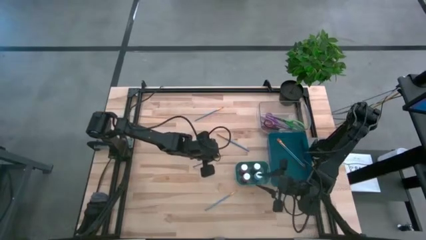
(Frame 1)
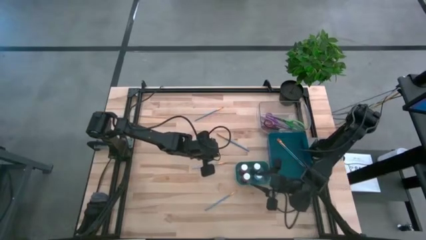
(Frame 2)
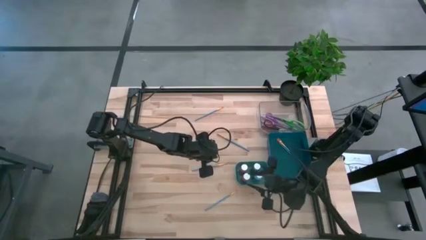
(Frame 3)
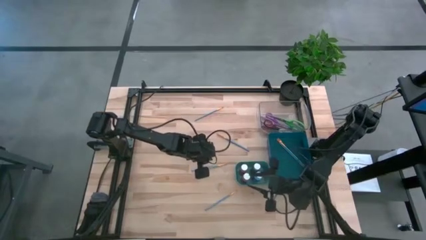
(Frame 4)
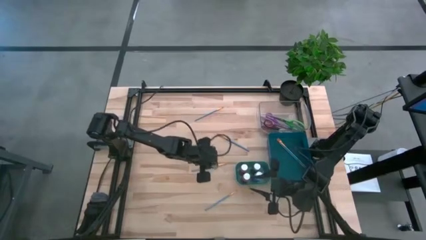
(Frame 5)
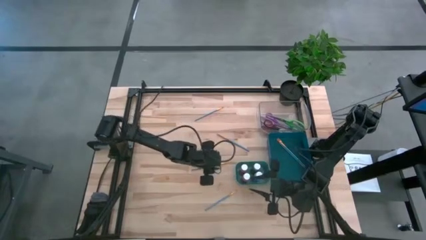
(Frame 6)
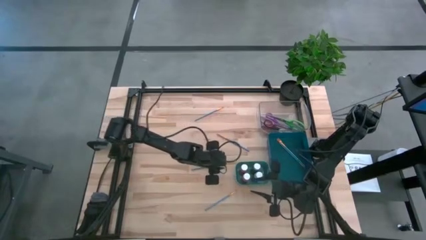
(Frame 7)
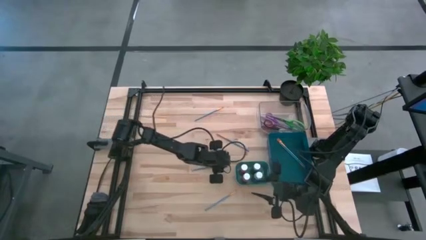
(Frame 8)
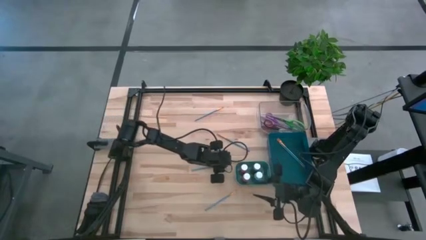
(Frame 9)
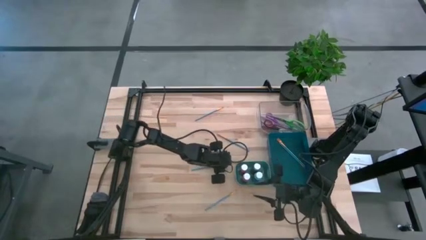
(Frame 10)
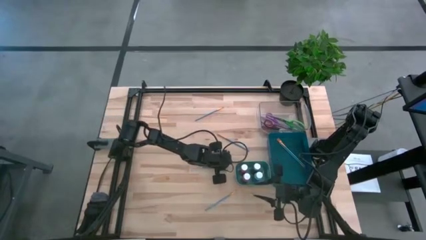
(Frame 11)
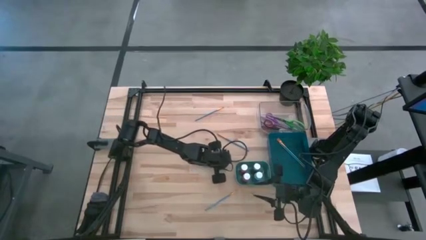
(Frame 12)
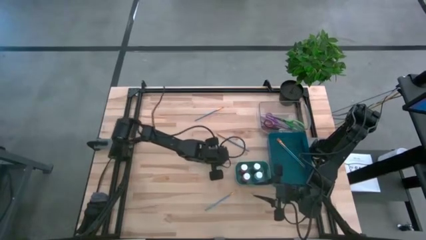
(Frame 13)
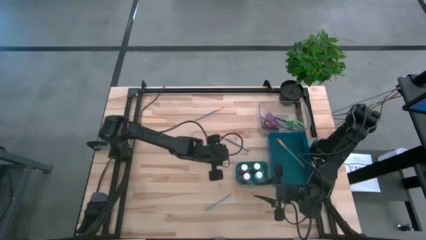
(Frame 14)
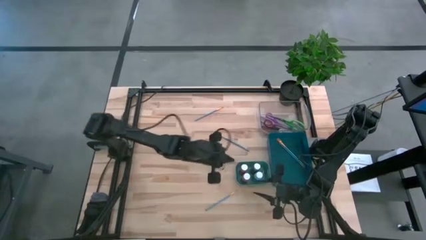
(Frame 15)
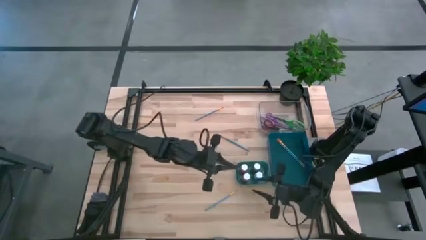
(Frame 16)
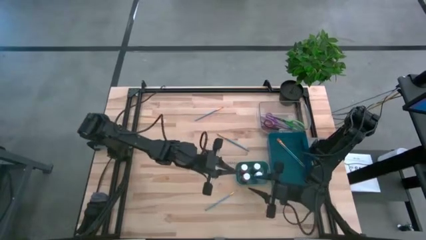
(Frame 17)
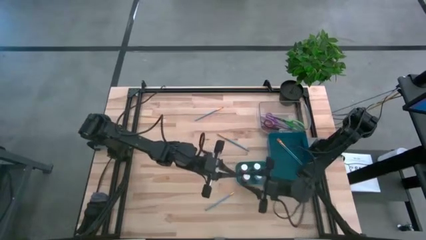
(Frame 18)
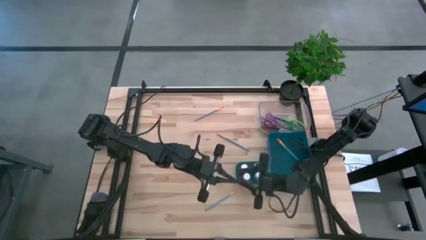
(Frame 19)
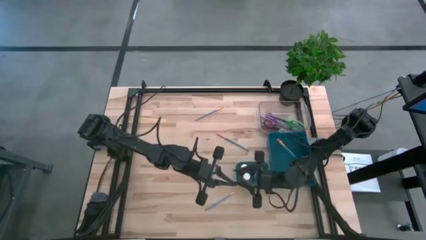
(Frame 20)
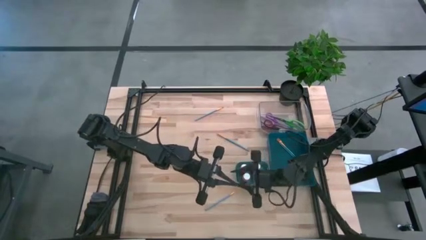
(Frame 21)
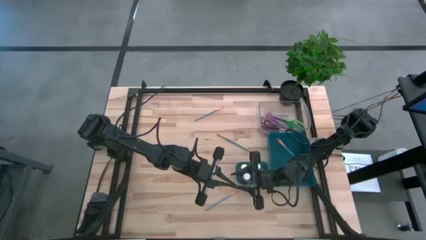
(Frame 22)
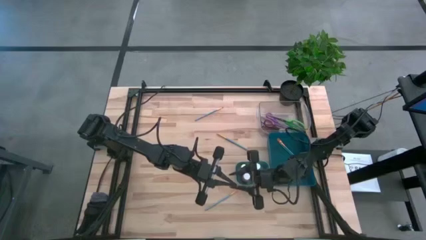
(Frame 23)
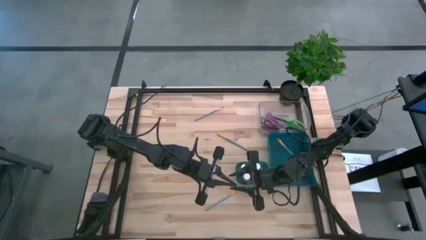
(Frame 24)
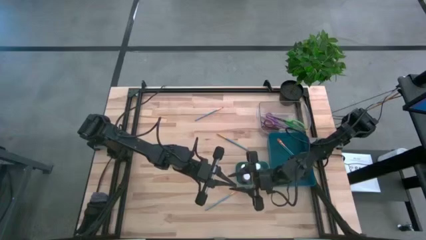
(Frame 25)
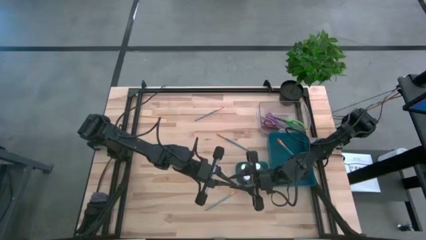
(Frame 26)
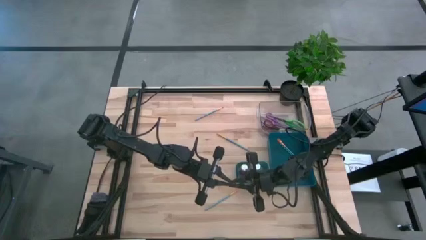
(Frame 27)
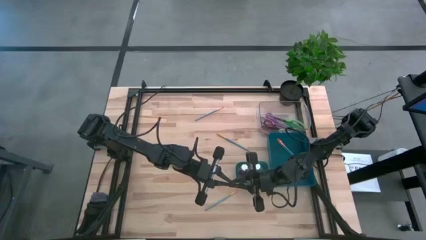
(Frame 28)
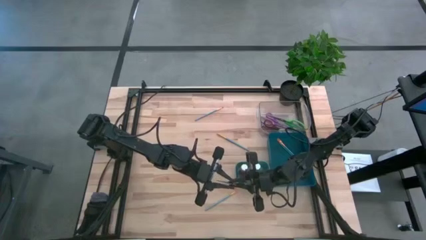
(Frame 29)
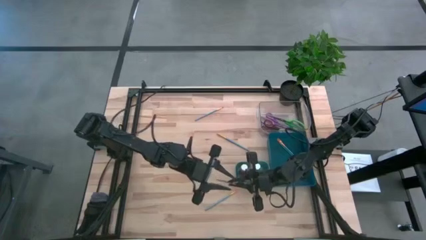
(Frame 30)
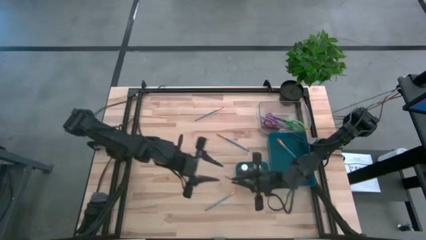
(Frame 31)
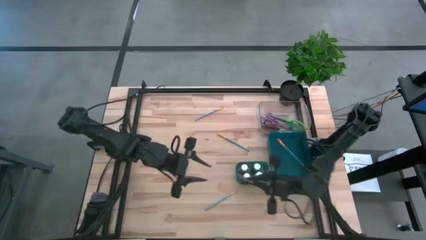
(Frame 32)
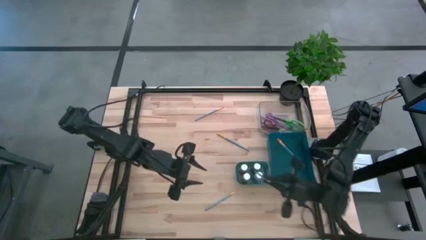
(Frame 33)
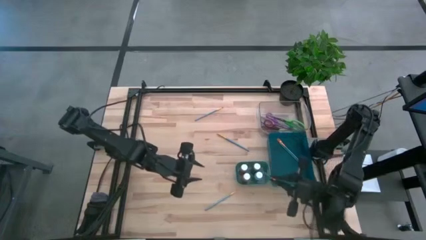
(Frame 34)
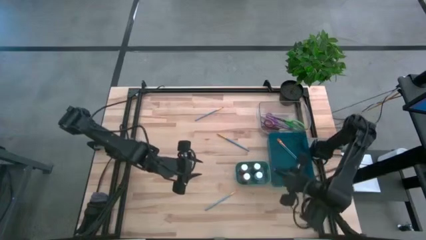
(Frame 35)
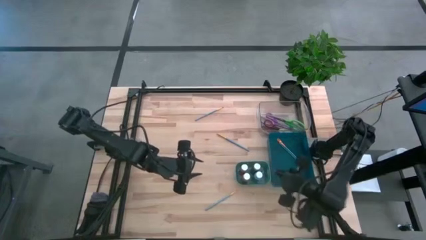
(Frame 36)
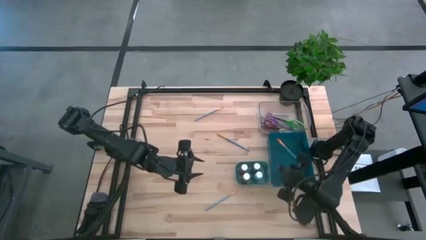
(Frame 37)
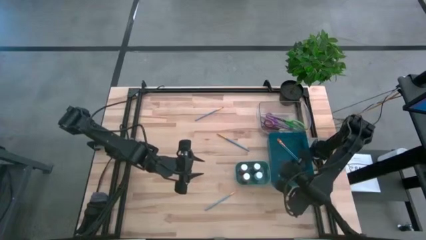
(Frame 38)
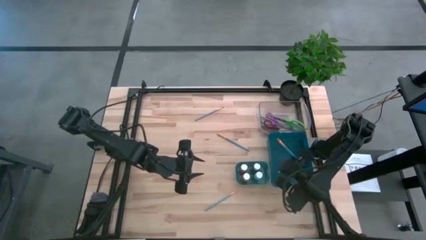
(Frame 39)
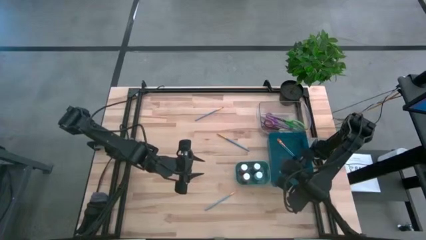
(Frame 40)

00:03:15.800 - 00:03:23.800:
Task: Pick & Place Paint Supplies
Put the blue paintbrush into the blue bin

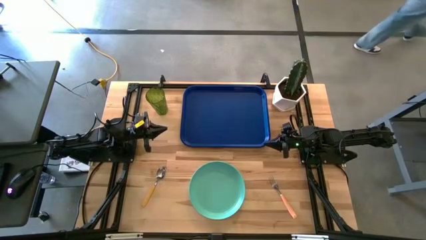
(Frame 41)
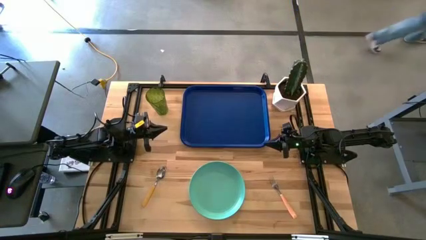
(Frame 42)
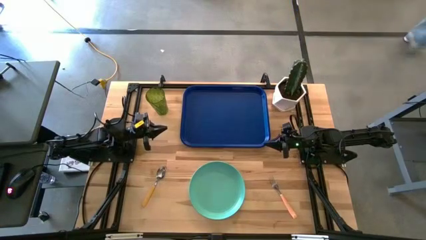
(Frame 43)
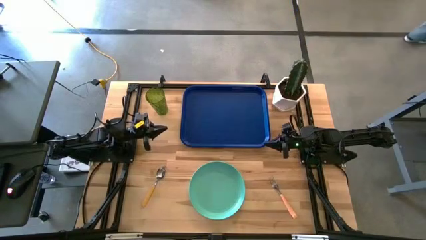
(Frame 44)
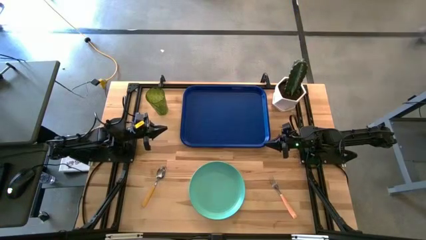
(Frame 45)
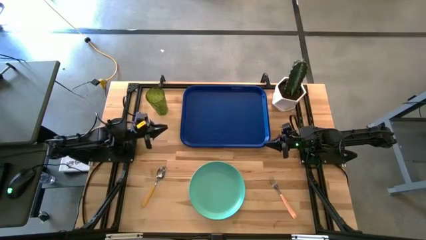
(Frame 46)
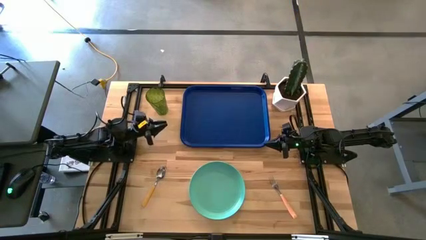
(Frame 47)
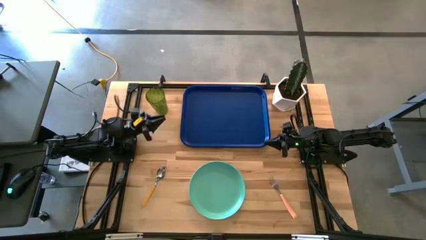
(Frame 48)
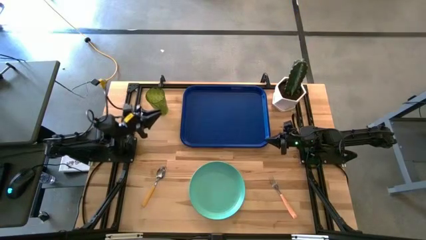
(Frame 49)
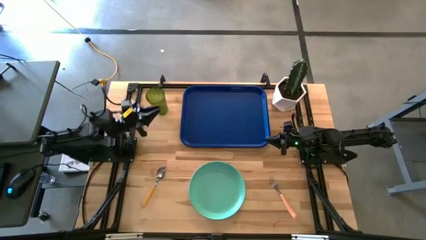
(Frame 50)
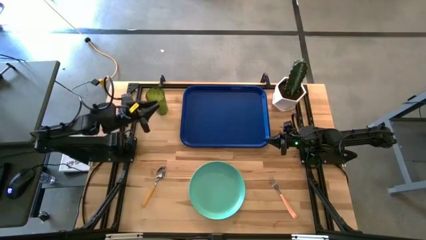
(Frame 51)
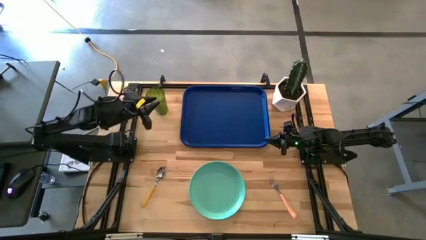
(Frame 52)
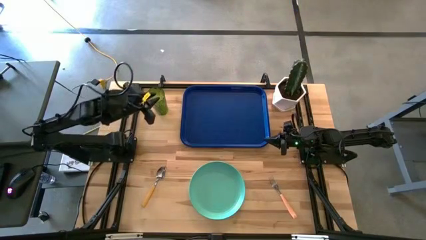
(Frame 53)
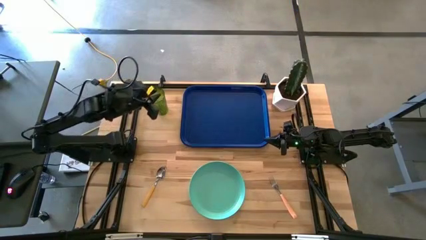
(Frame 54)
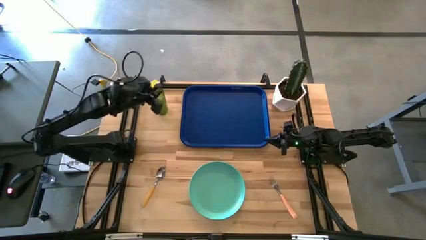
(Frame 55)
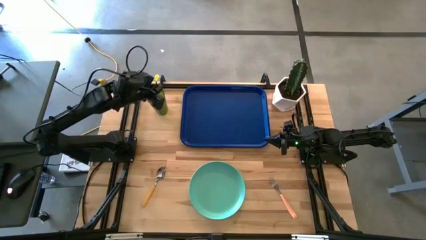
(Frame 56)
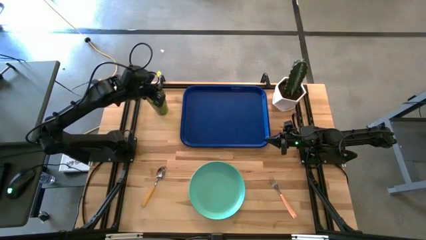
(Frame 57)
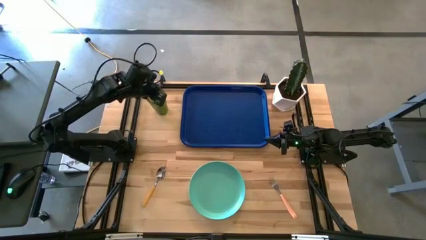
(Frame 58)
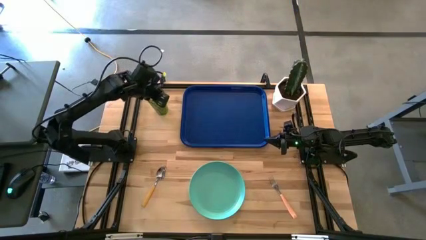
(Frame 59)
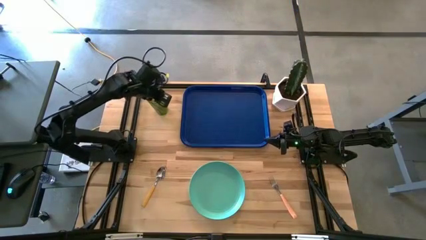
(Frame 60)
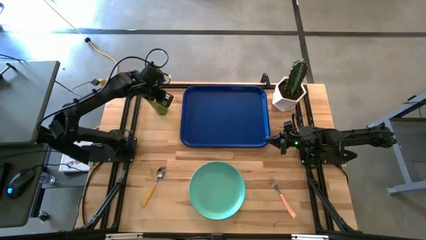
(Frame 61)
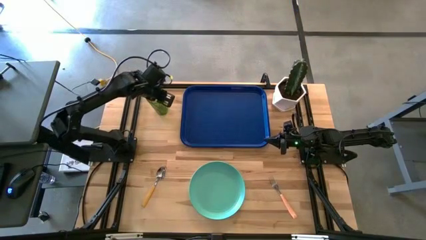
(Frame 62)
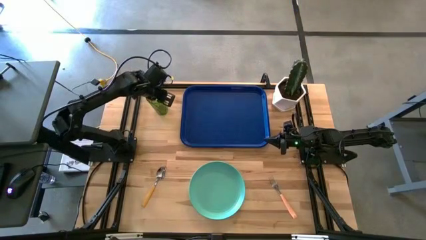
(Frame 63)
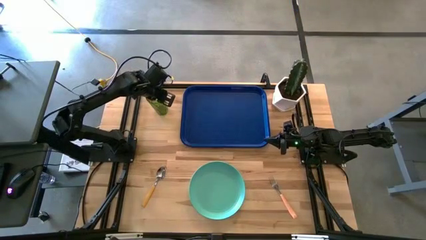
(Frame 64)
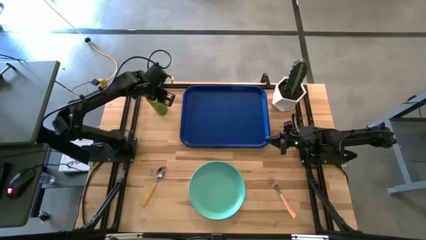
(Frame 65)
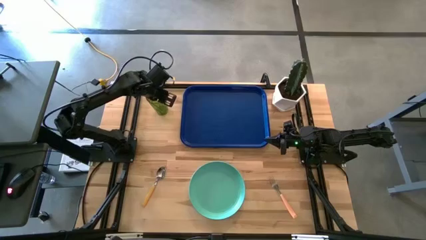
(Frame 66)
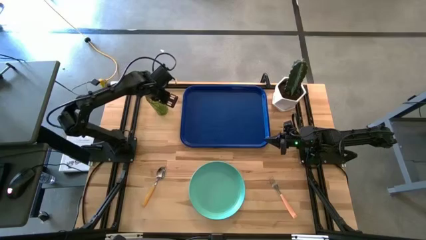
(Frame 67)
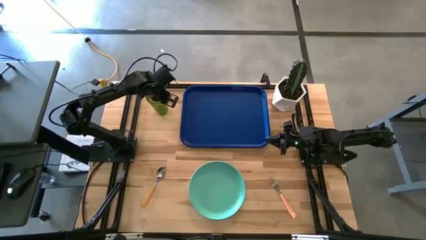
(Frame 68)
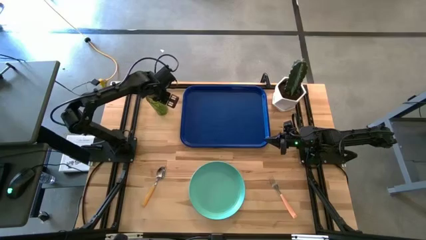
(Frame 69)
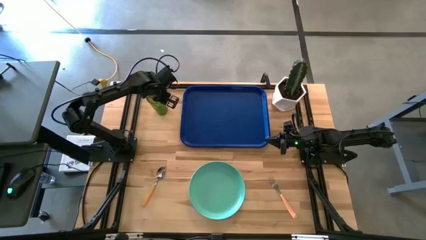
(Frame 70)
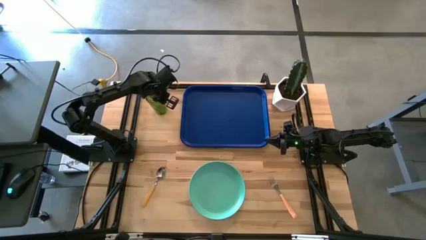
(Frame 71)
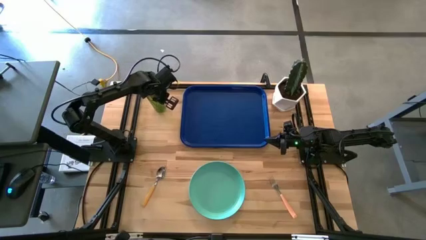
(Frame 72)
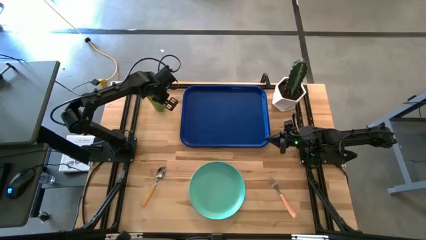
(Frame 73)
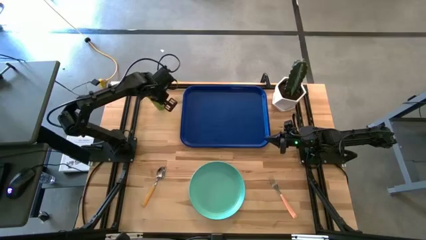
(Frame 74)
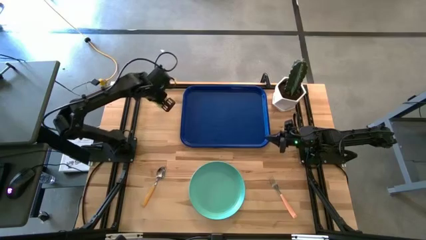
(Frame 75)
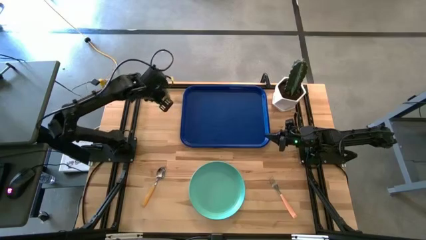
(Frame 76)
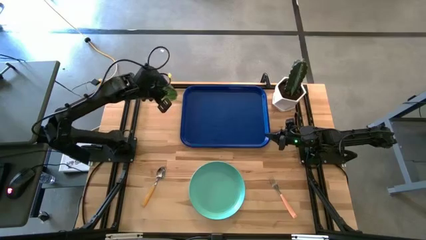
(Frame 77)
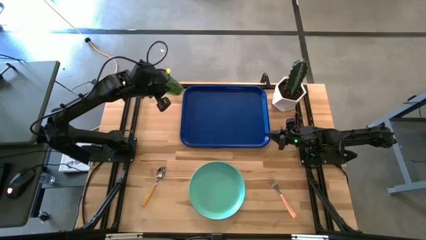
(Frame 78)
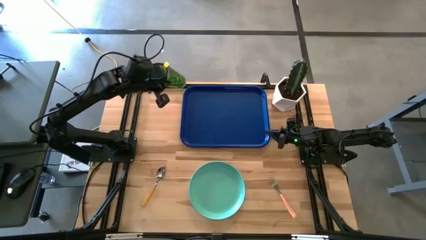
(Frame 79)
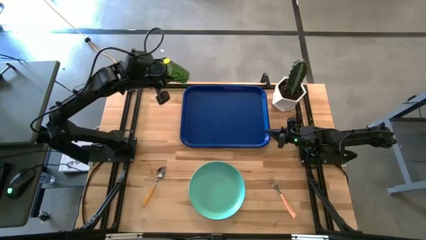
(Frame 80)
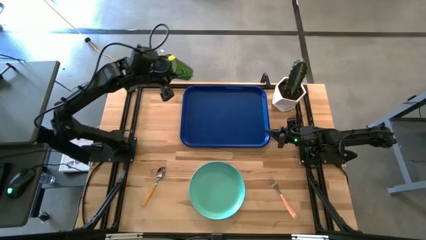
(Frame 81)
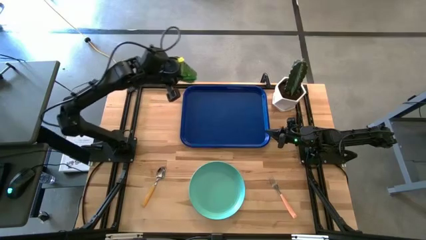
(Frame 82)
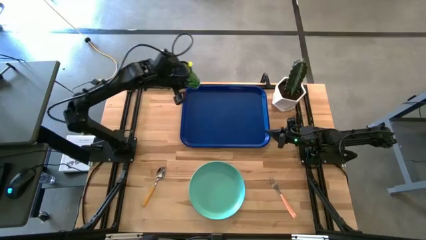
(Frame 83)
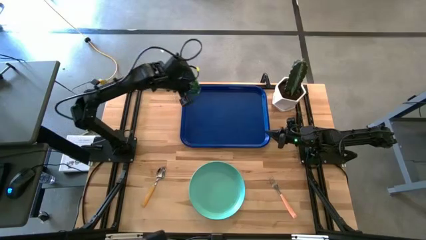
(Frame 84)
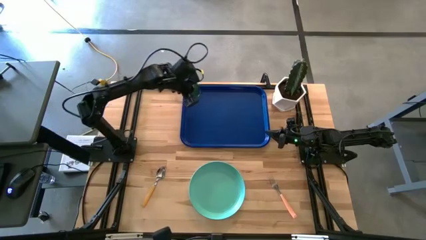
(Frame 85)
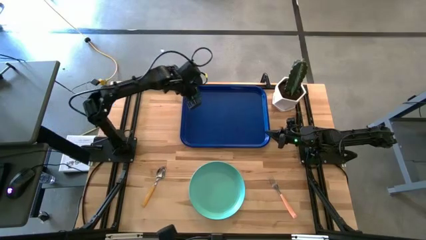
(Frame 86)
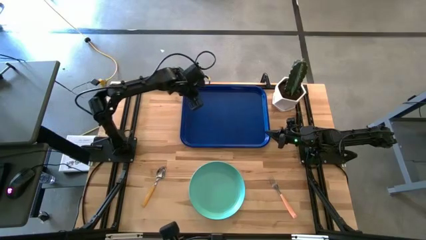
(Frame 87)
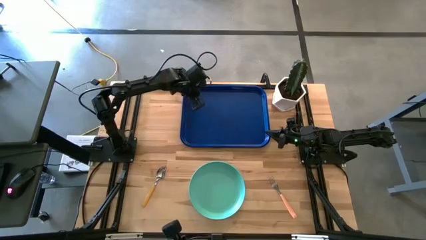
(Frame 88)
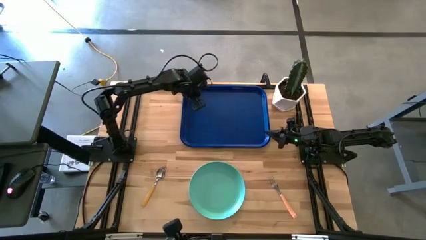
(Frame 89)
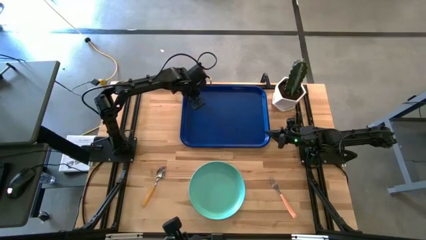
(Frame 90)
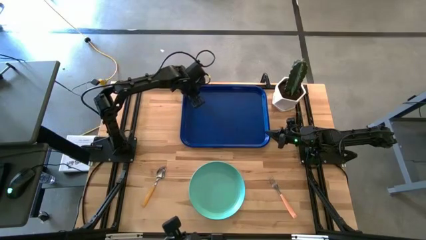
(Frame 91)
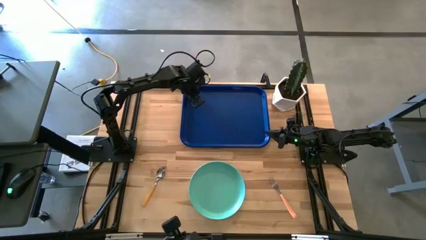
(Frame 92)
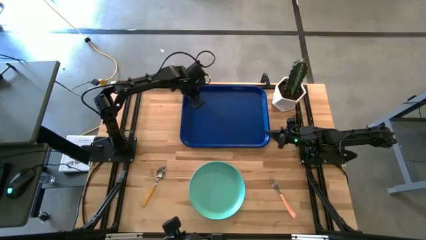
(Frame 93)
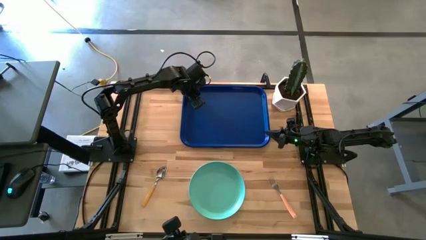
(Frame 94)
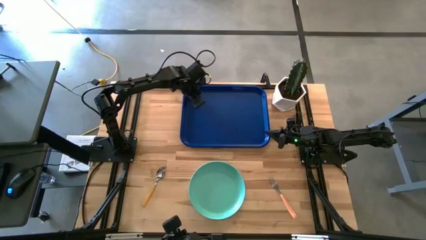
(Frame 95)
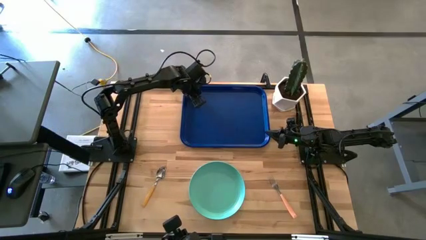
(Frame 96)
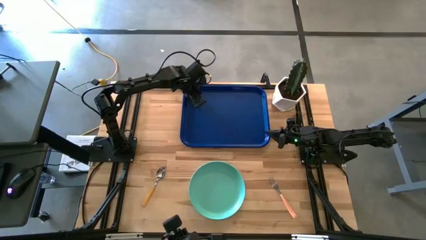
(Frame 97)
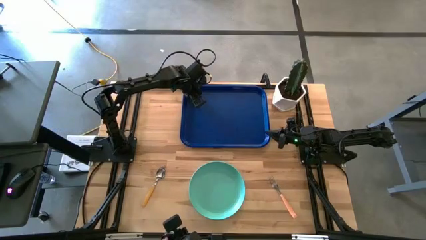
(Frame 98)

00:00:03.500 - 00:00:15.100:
Task: Pick and place plate/cup/fork/spoon on tray
Put the green cup on the blue serving tray
